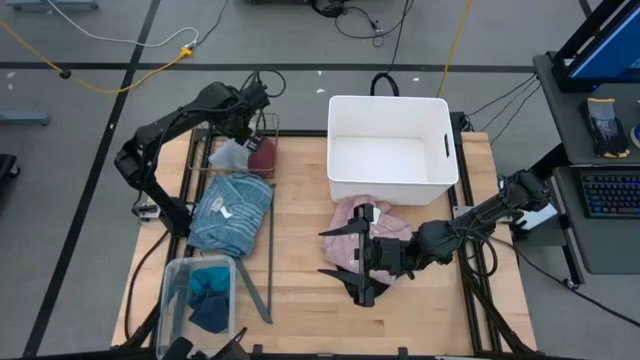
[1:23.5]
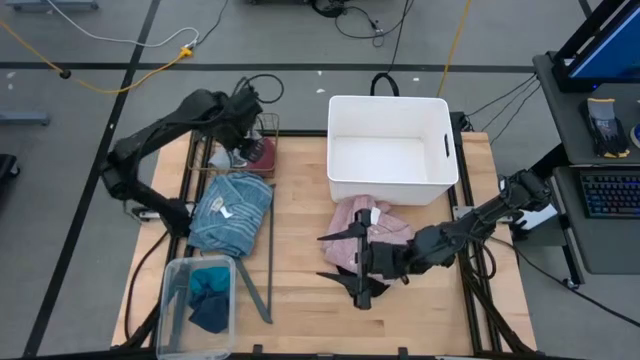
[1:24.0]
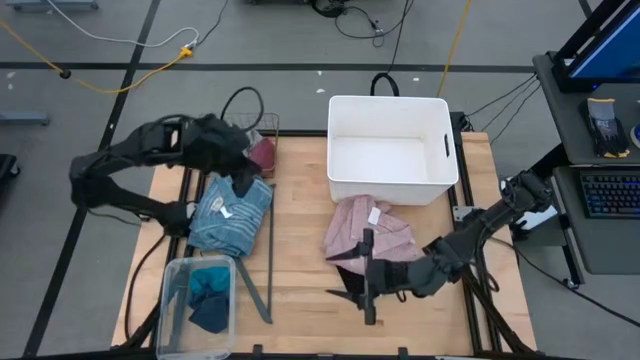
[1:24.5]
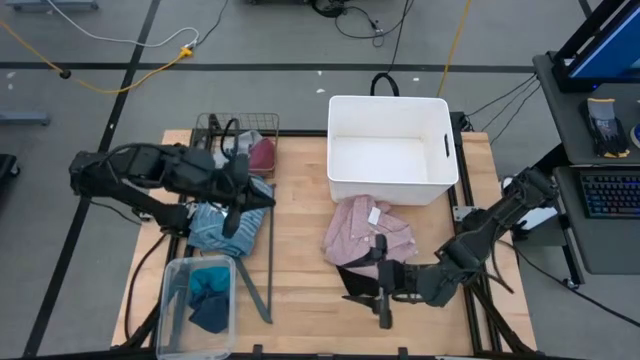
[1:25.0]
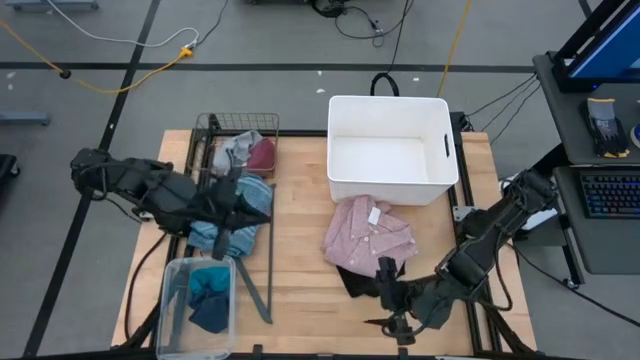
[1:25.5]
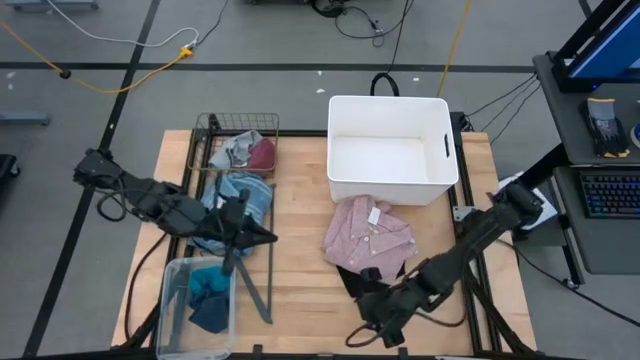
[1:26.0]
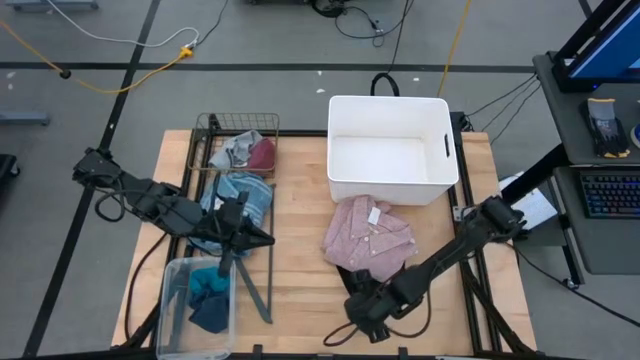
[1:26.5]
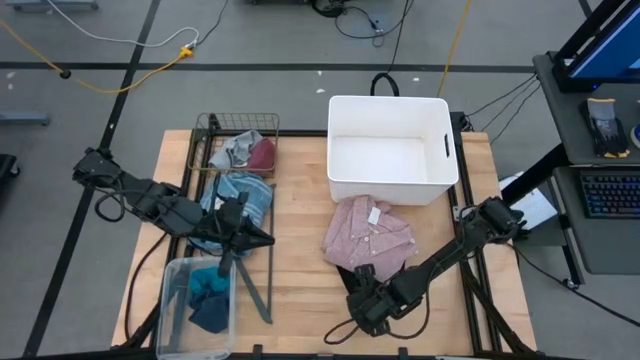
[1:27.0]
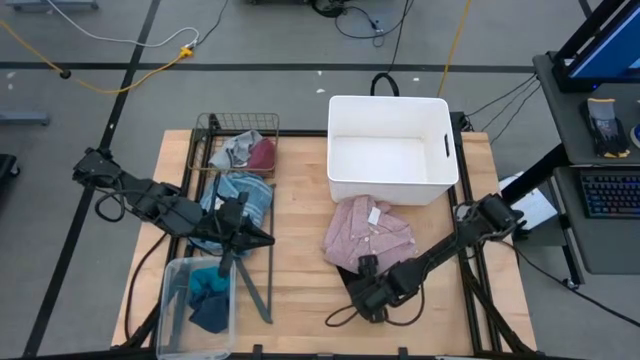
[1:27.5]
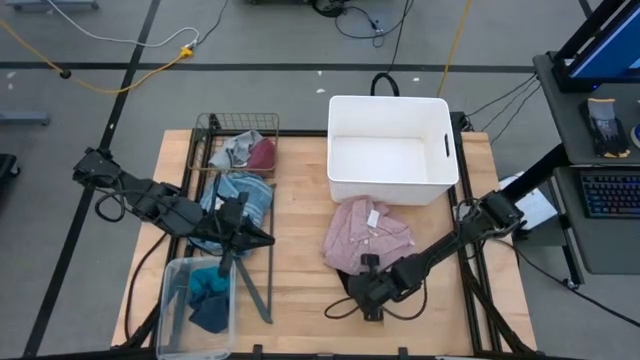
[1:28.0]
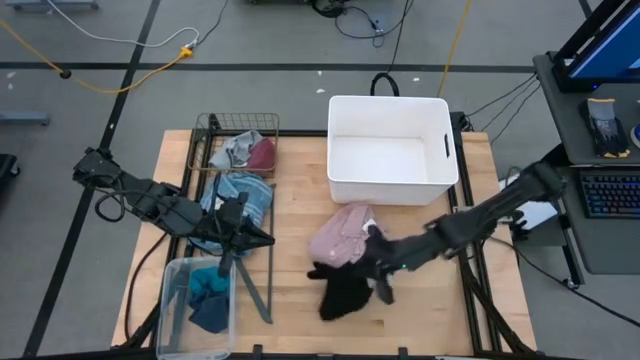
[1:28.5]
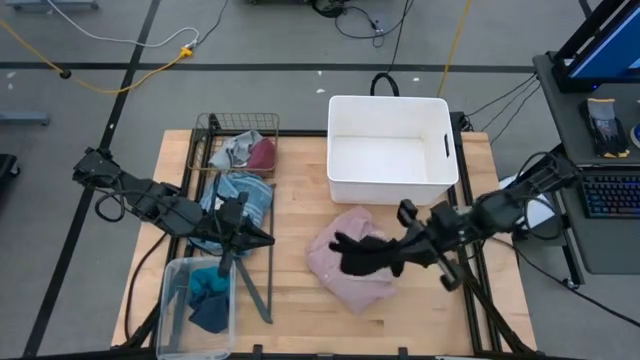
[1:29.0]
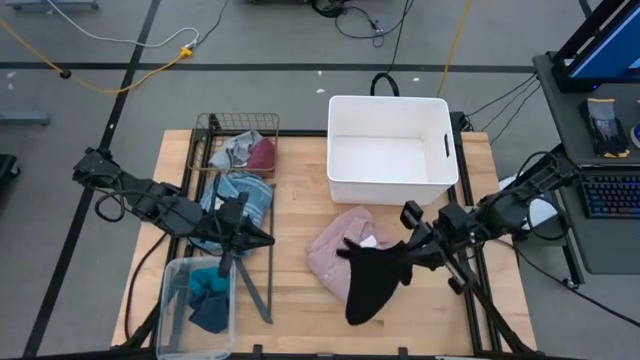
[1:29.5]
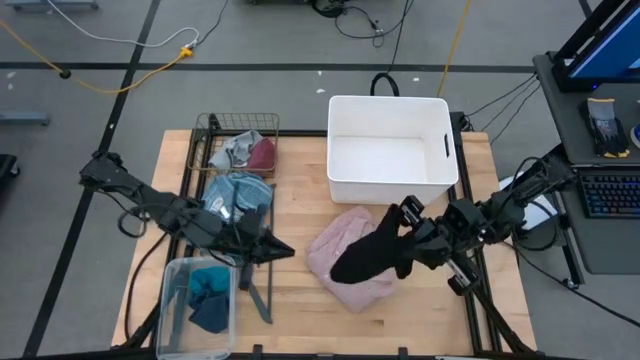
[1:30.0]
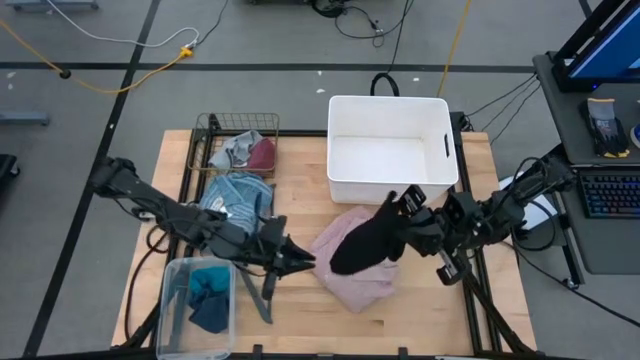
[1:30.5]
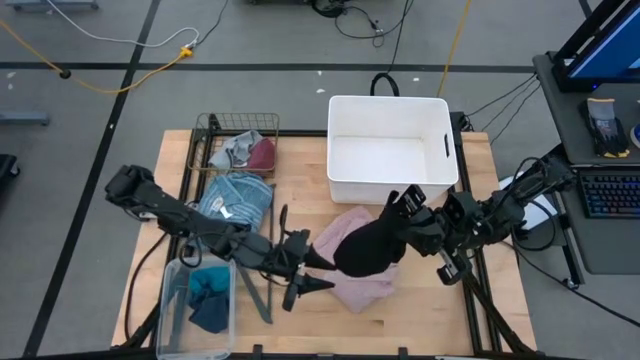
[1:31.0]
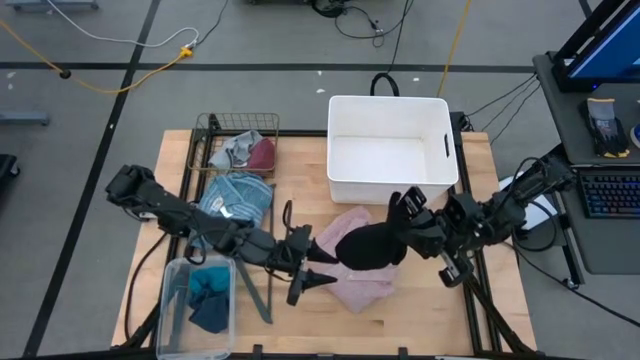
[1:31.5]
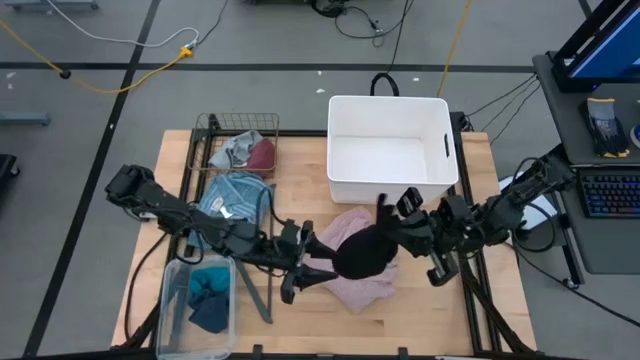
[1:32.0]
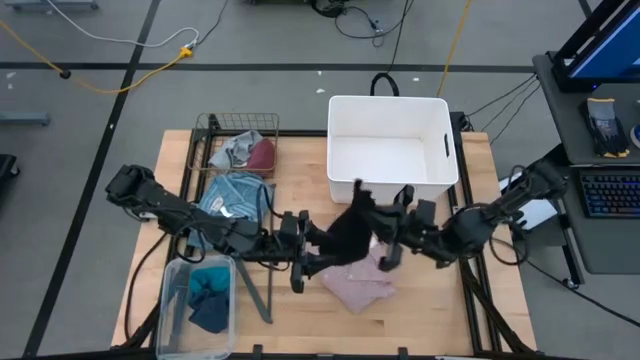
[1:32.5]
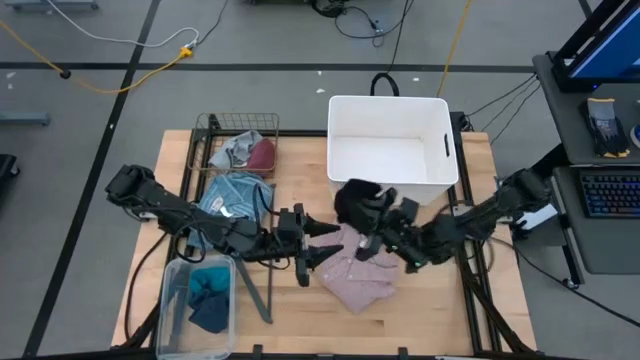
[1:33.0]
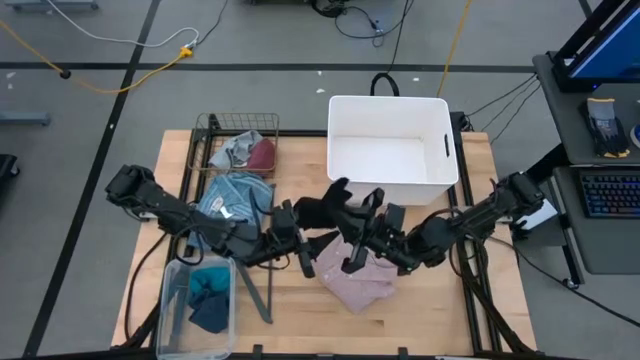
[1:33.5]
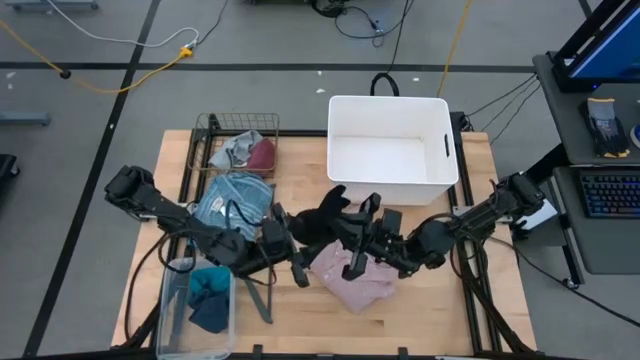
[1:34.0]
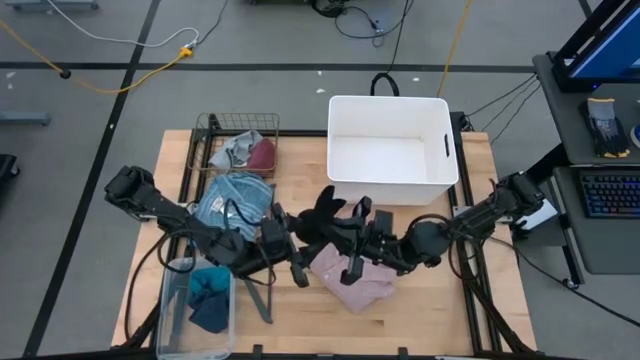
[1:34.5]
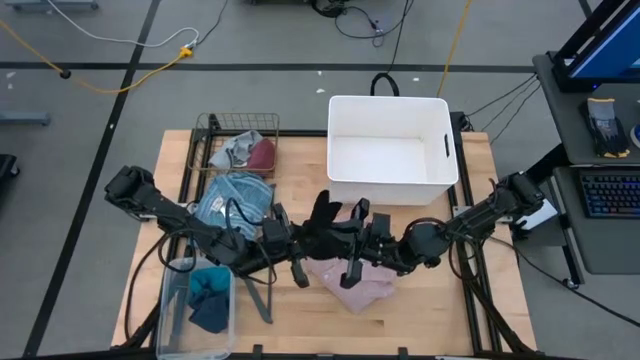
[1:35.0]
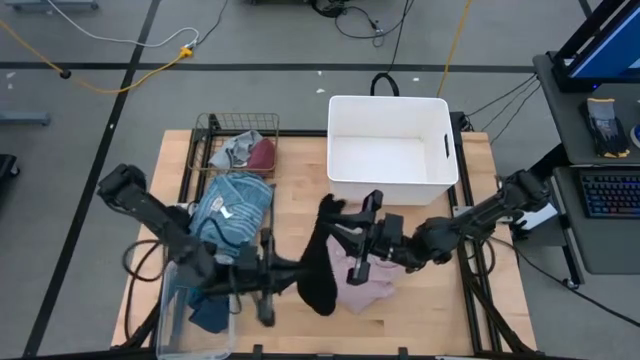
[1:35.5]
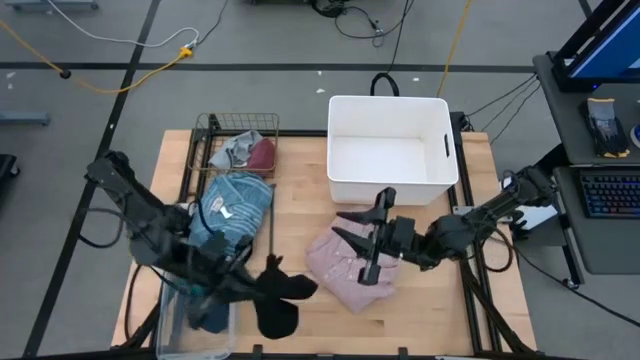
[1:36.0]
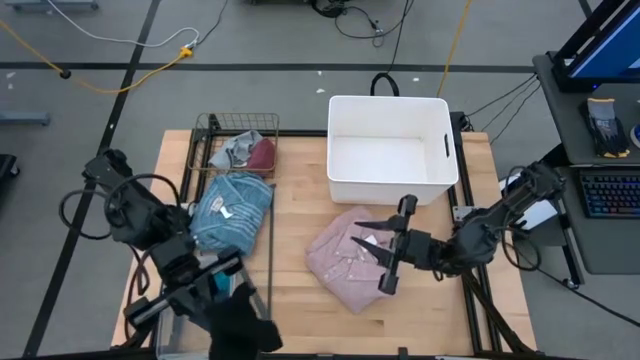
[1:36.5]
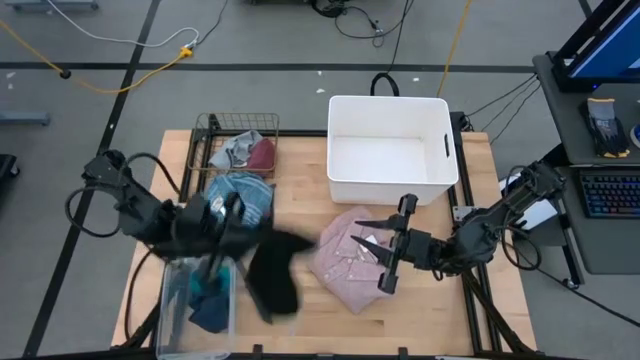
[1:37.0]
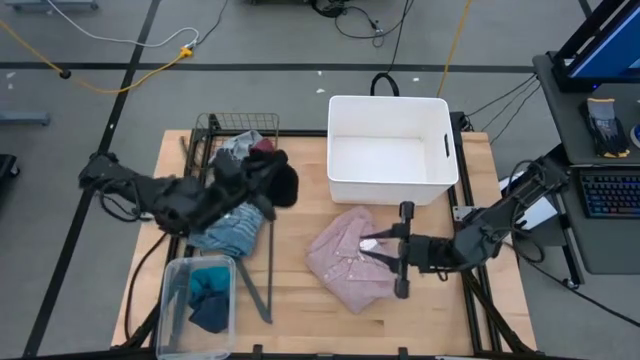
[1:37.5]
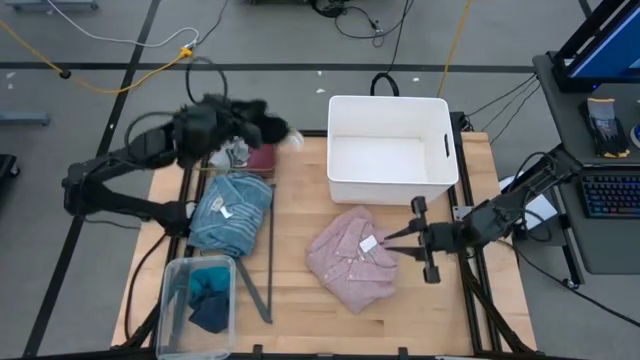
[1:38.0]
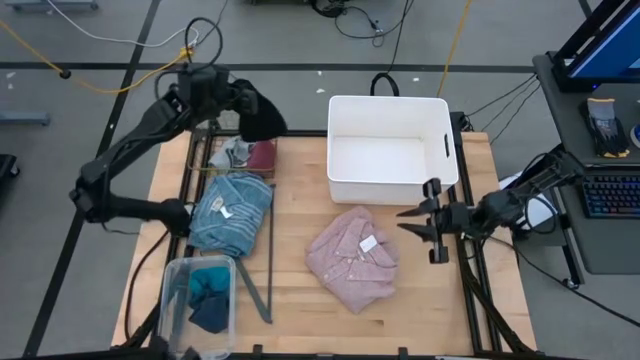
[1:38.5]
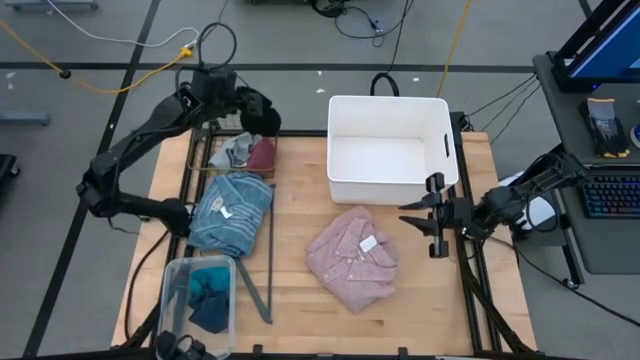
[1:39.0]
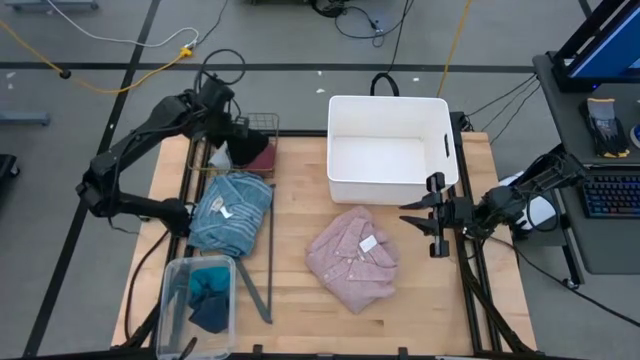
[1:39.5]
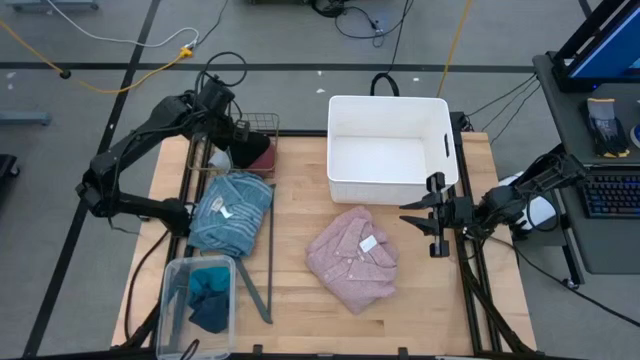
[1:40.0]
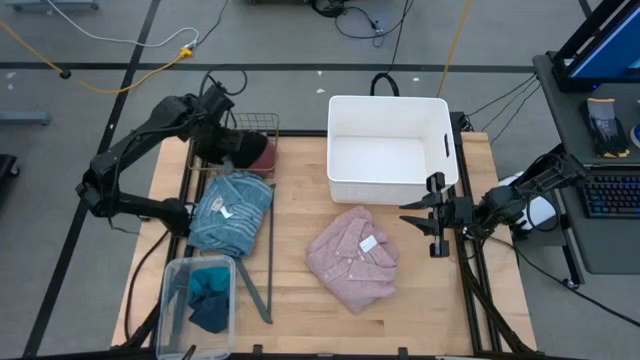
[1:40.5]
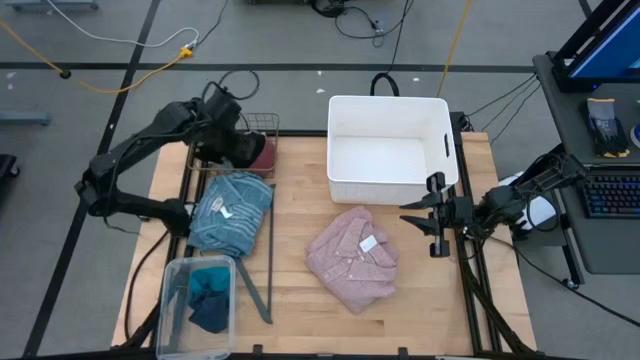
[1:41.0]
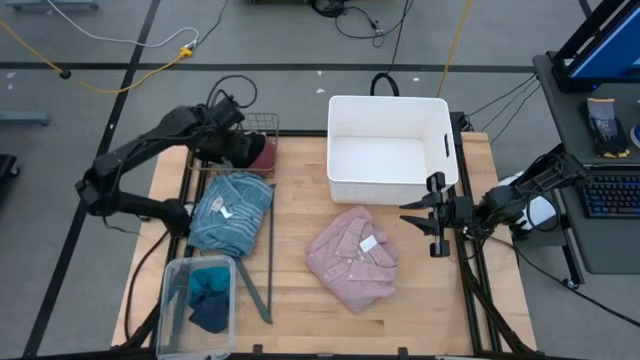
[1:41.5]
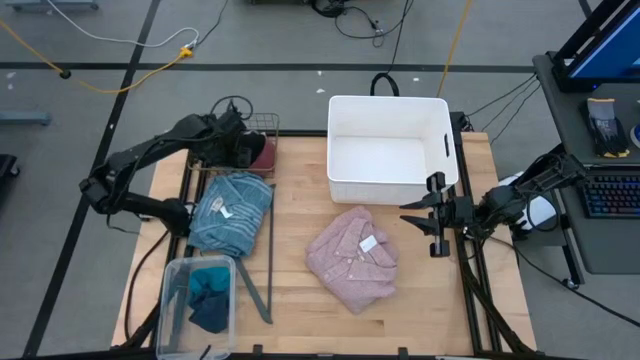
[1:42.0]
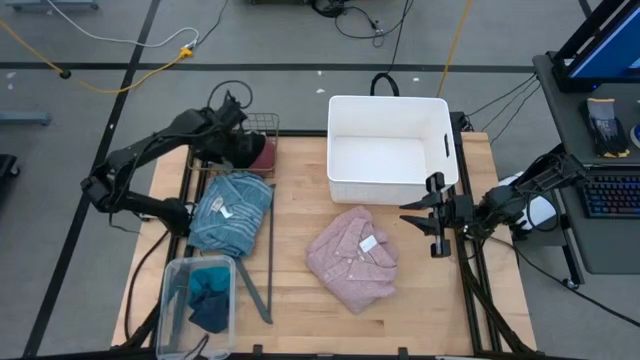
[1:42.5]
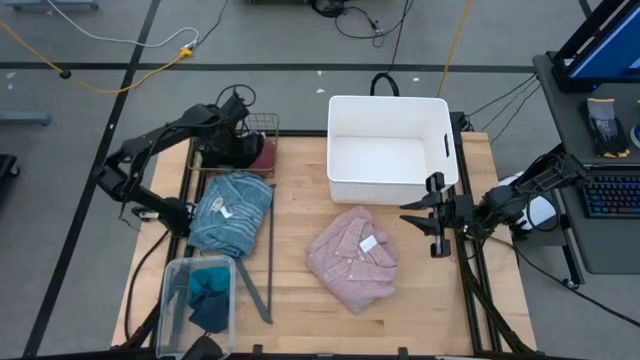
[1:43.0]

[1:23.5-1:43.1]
Task: Pick & Place Cloths
Put the black shorts into the black wire basket

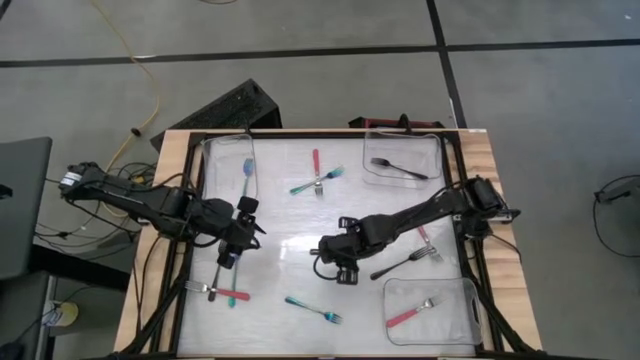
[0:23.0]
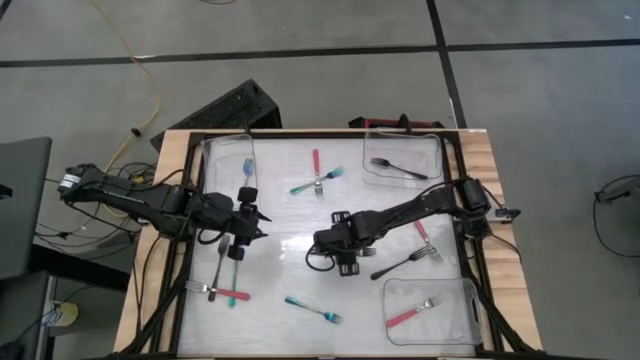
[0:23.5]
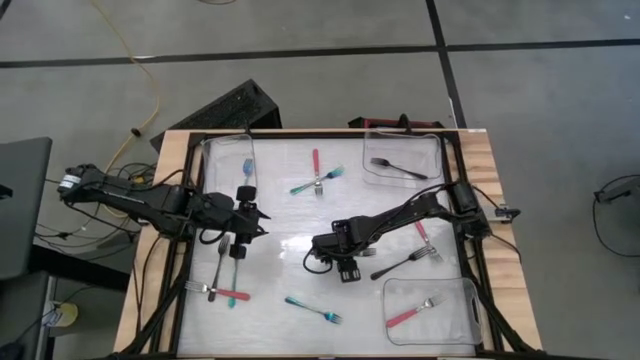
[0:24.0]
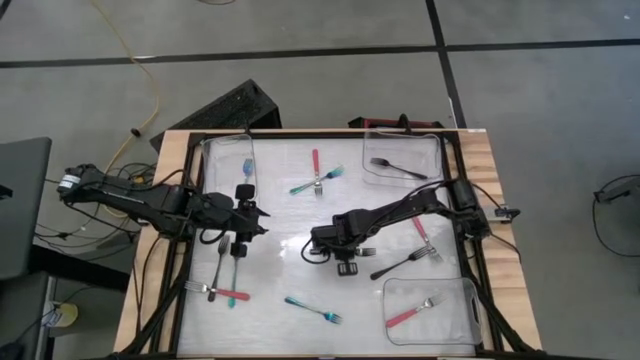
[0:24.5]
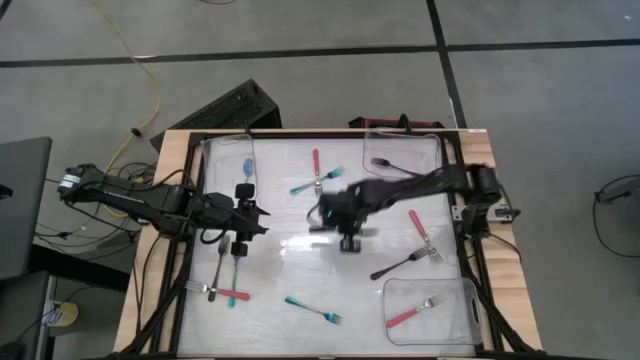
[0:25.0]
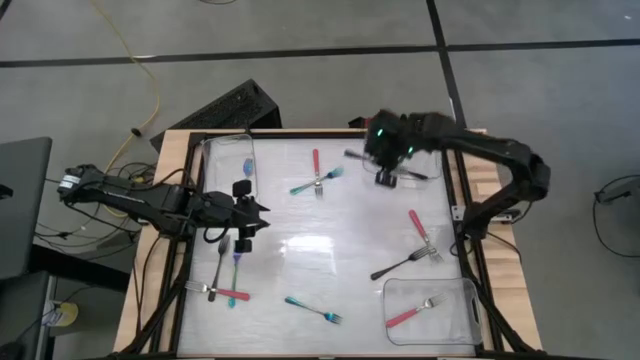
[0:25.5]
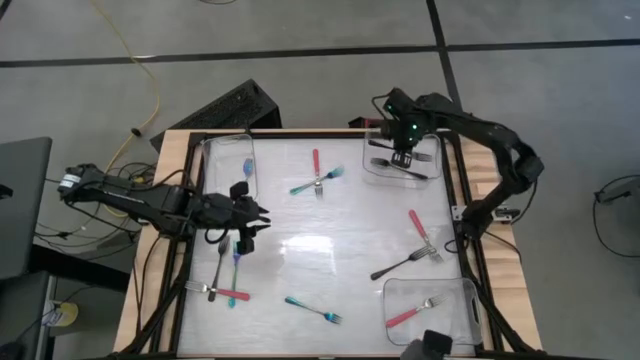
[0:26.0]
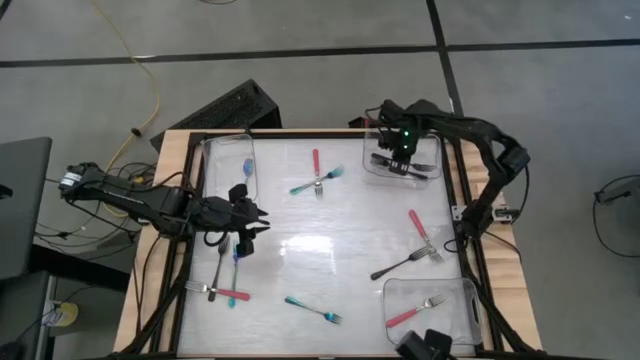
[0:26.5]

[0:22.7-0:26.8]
Task: Sort silverware by color (type)
Put the black fork into the top right transparent bin
